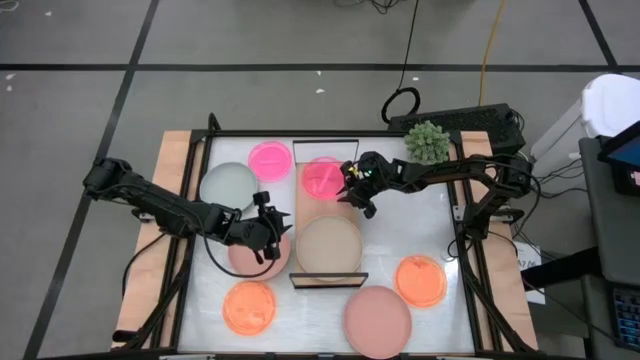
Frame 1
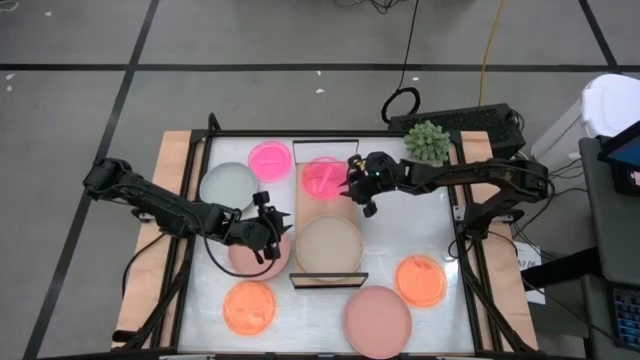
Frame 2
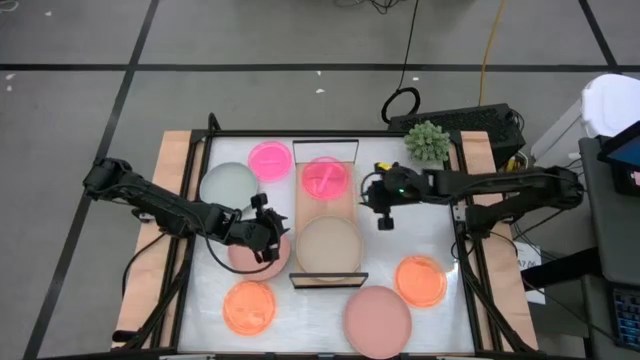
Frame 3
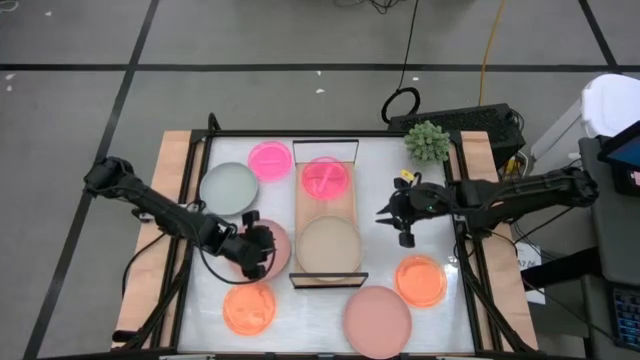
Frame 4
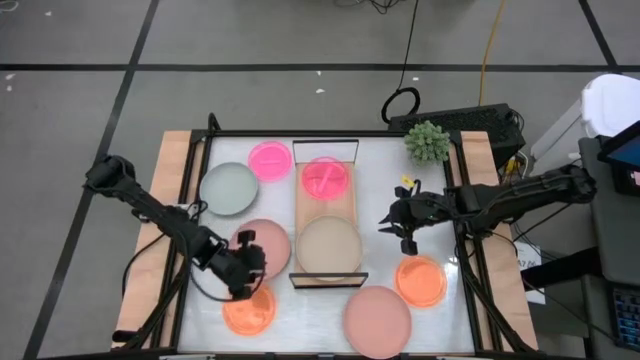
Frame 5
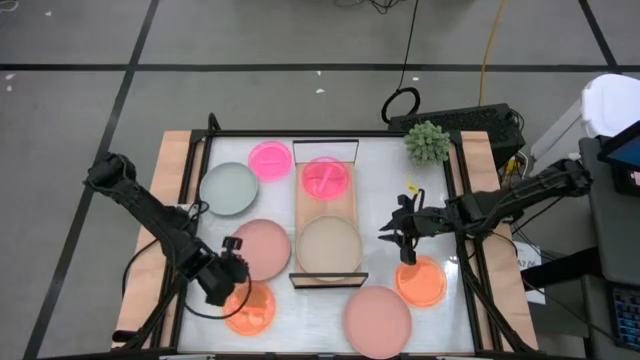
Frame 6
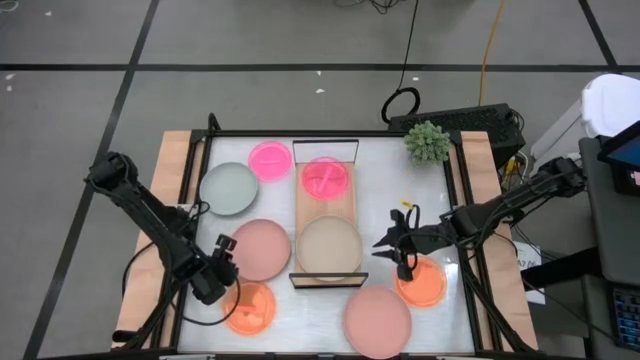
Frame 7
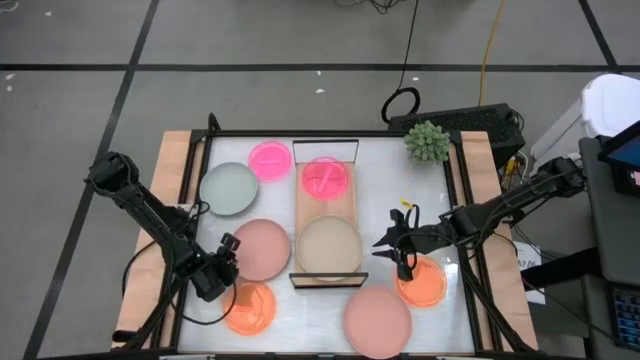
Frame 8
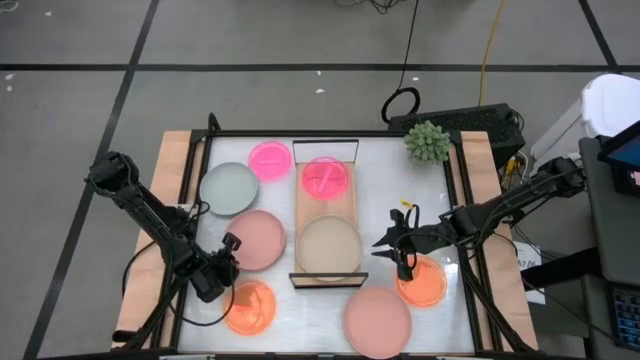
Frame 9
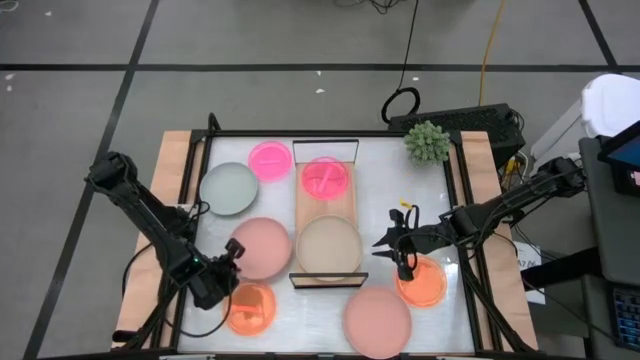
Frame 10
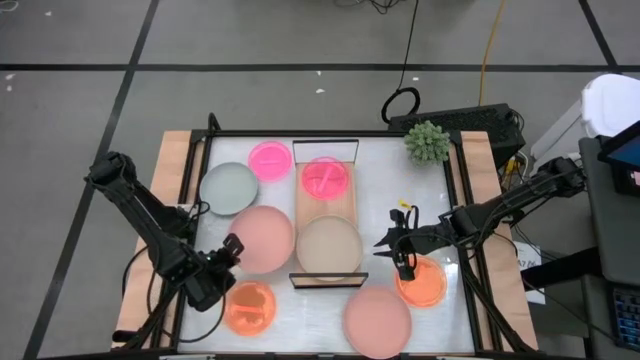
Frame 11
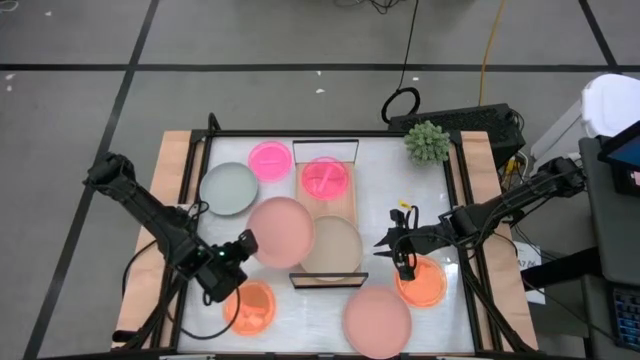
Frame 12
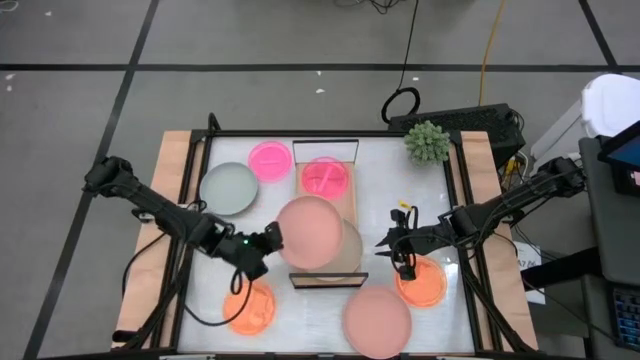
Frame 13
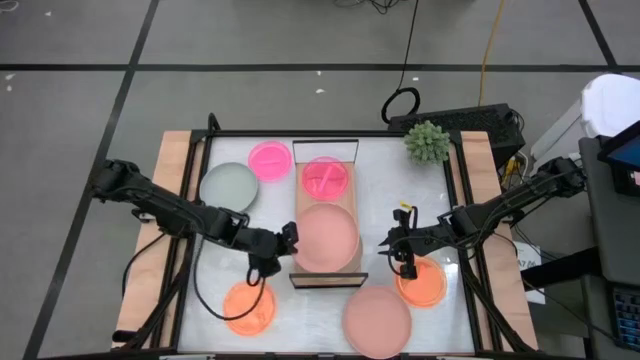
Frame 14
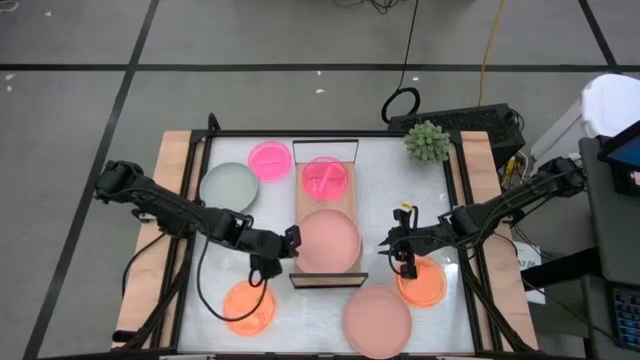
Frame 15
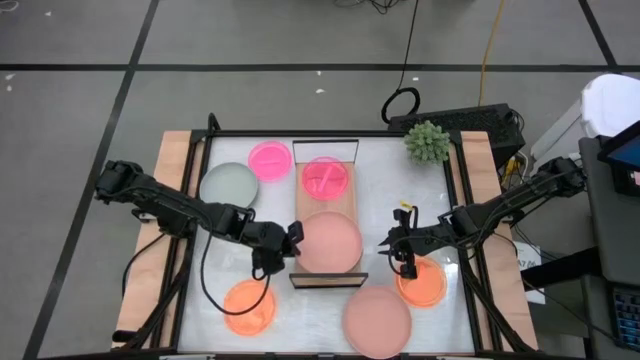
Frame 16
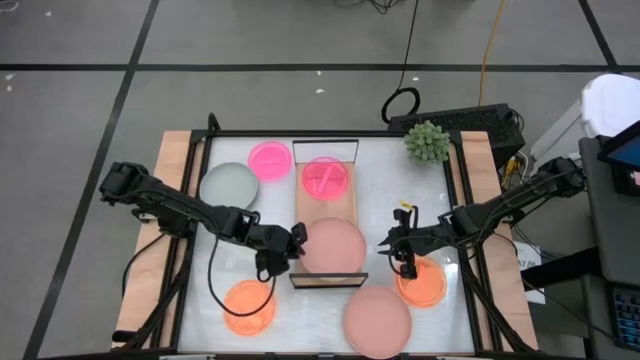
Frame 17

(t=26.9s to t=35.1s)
Task: Place and stack plates onto a shelf
Stack the left pink plate on top of the brown plate on the shelf

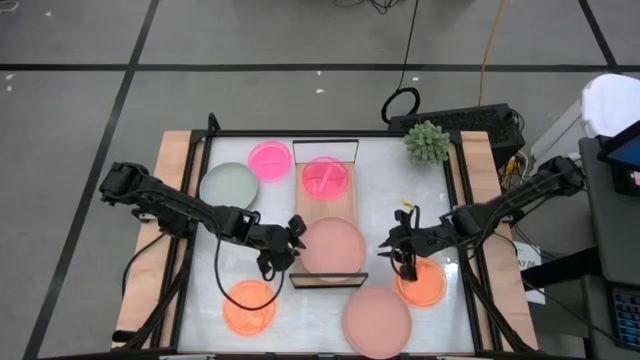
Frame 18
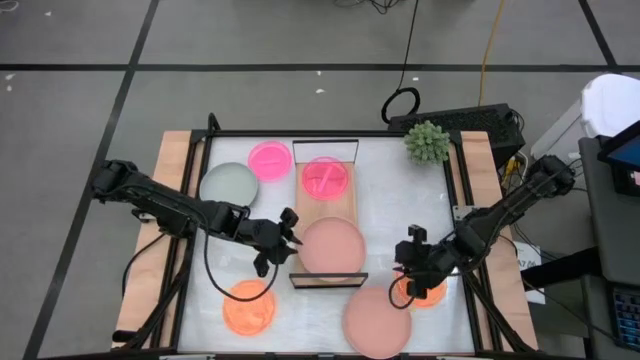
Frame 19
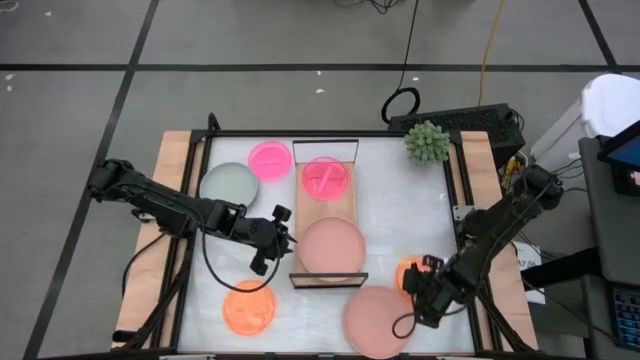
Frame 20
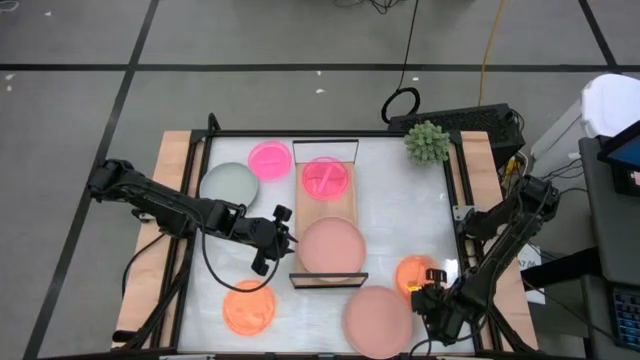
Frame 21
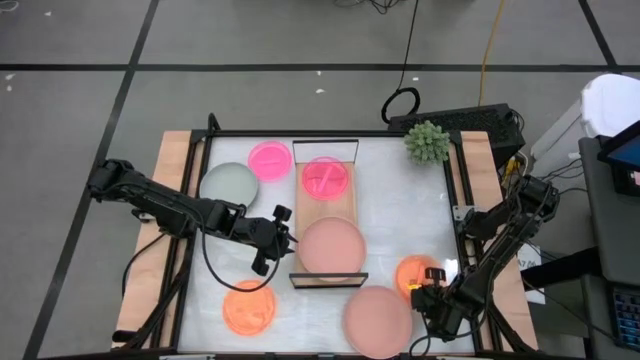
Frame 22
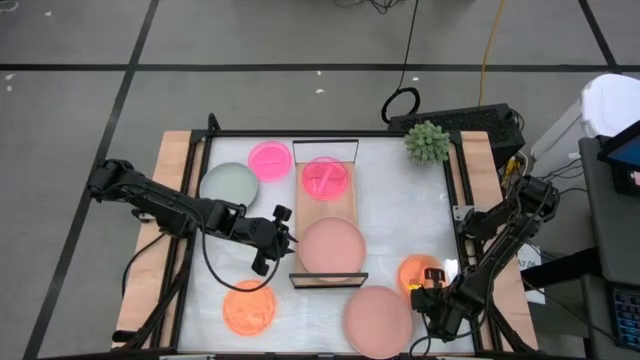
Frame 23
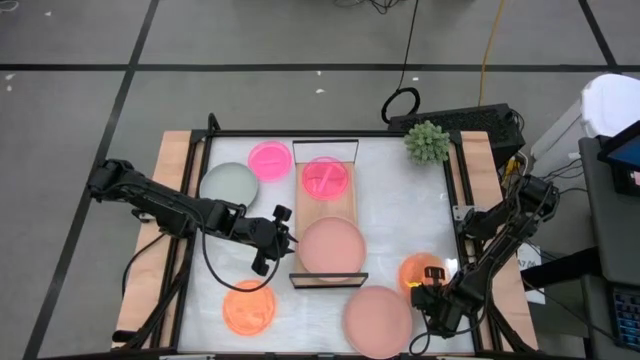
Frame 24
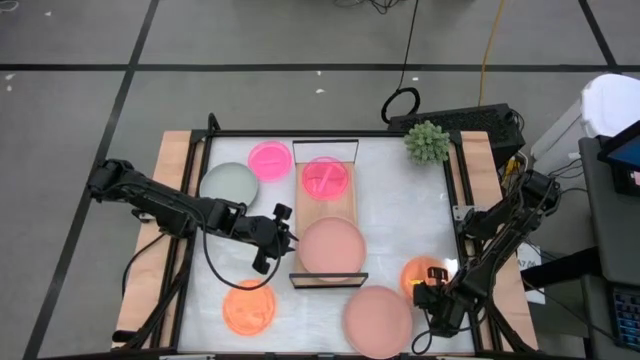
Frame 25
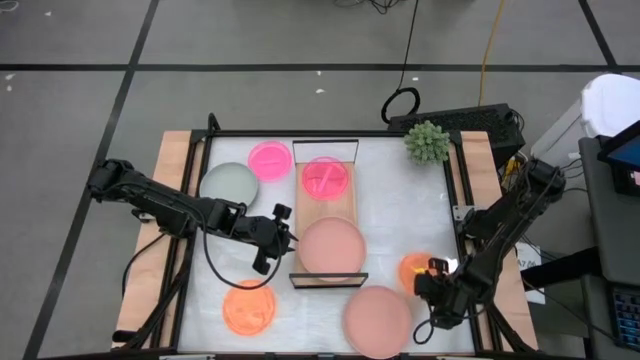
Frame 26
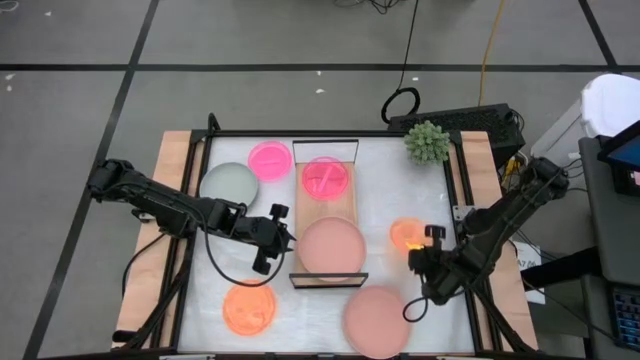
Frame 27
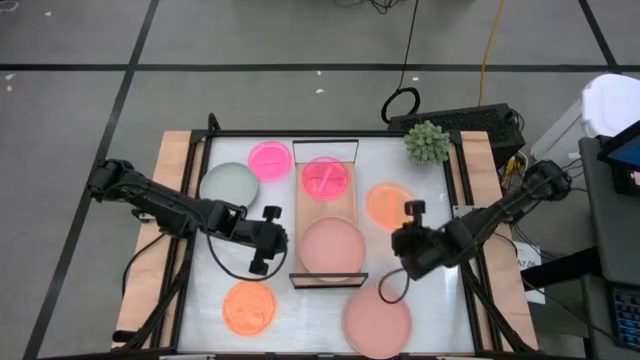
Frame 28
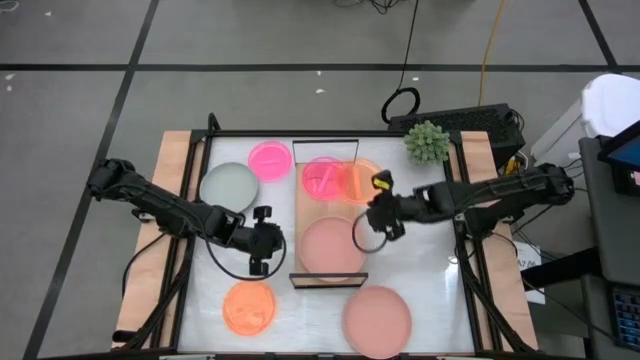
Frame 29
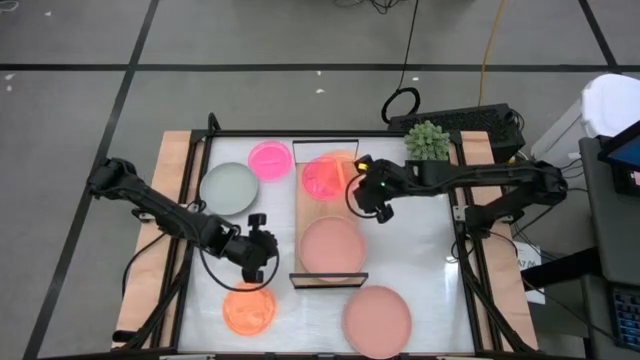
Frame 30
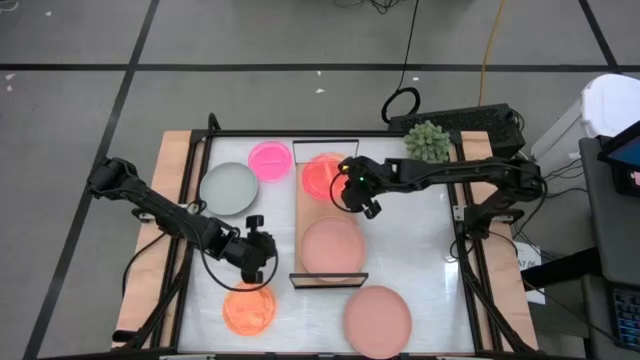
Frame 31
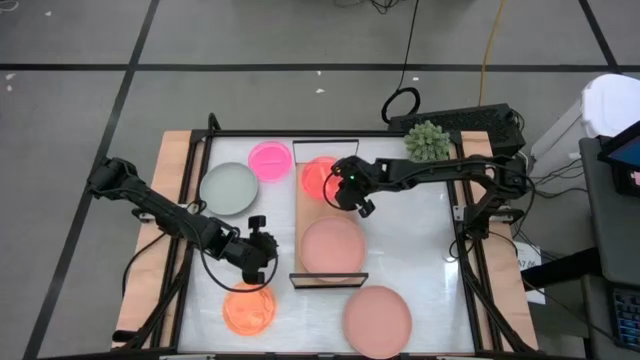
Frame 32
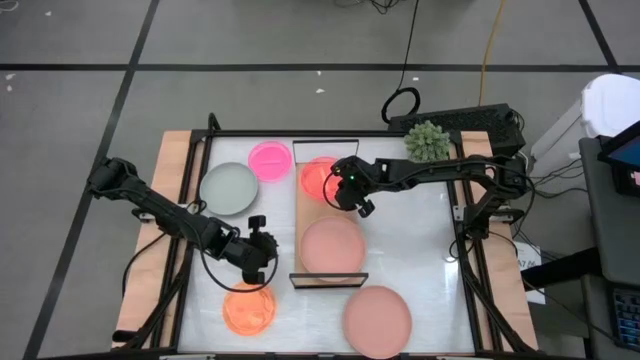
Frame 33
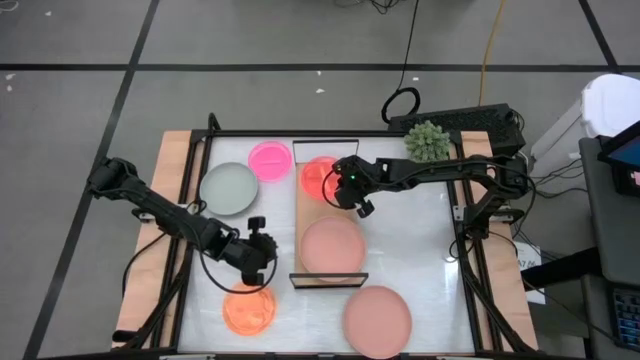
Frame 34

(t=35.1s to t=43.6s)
Stack the right orange plate on top of the pink plate on the shelf

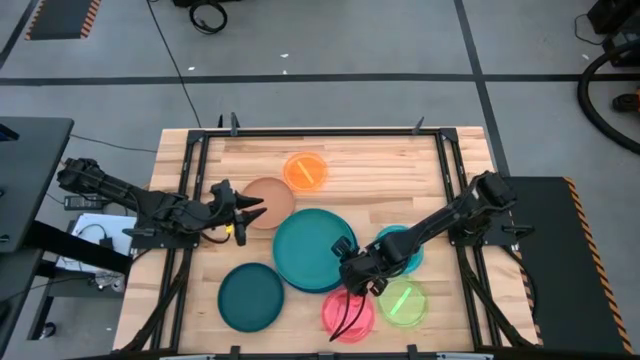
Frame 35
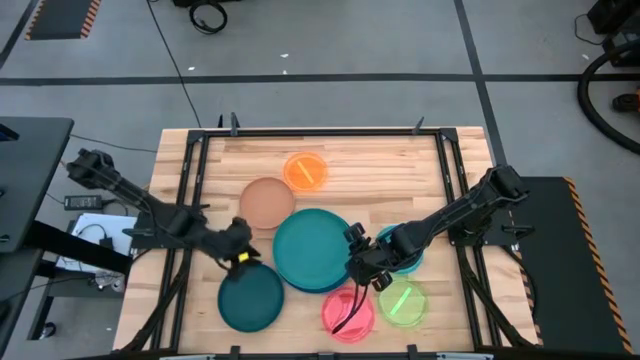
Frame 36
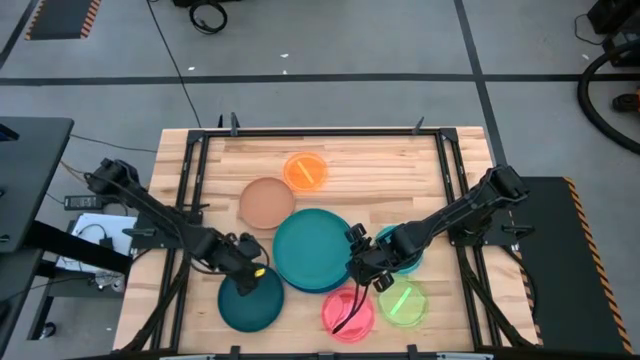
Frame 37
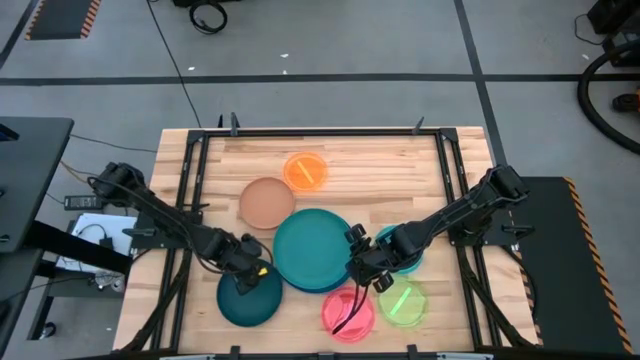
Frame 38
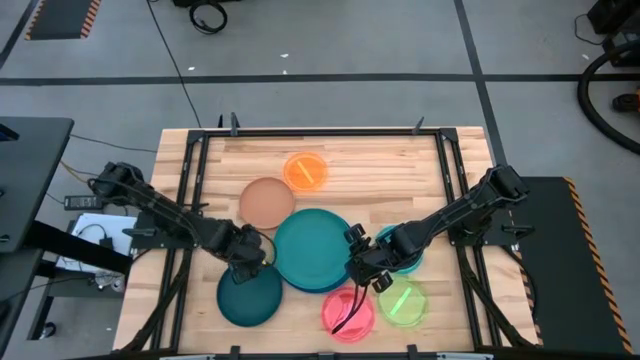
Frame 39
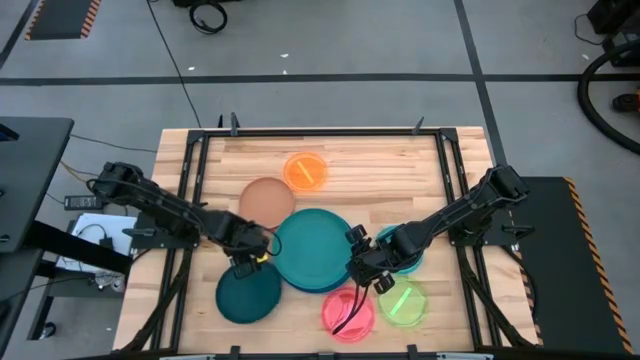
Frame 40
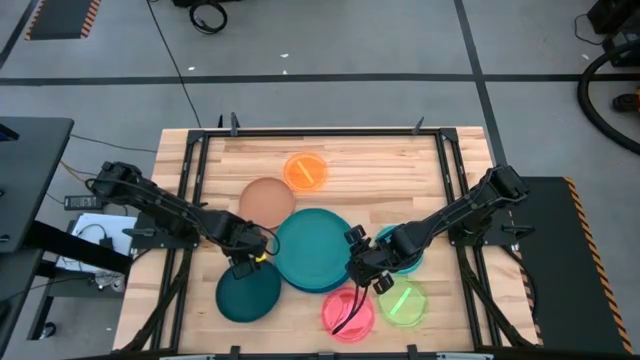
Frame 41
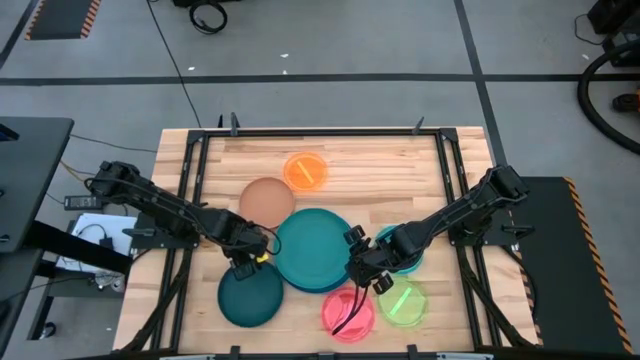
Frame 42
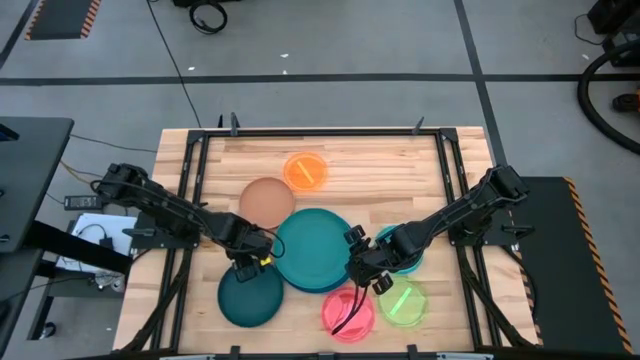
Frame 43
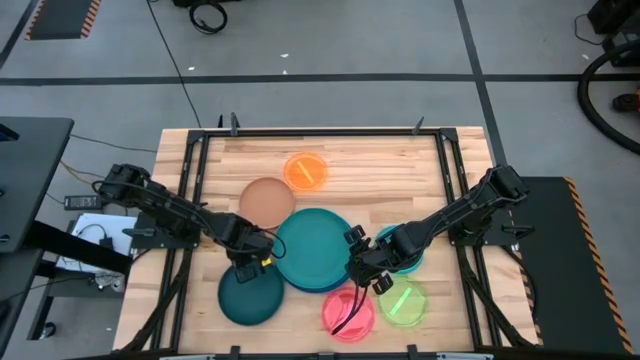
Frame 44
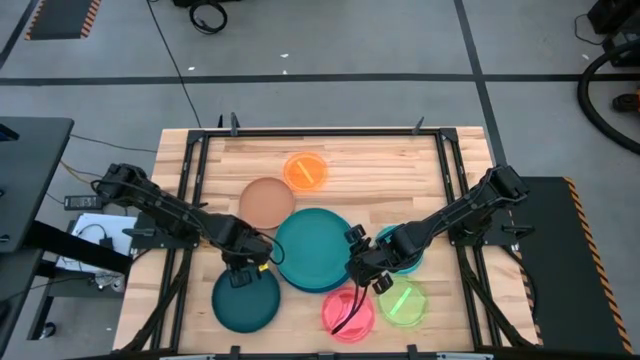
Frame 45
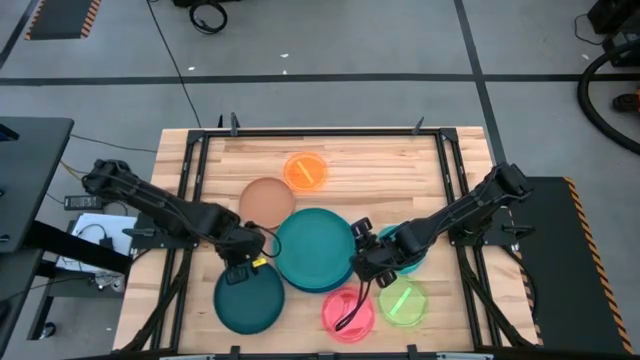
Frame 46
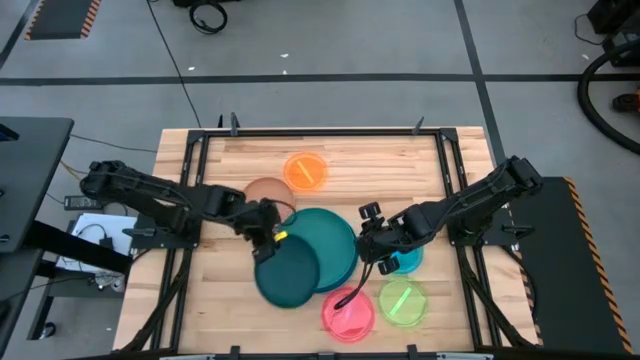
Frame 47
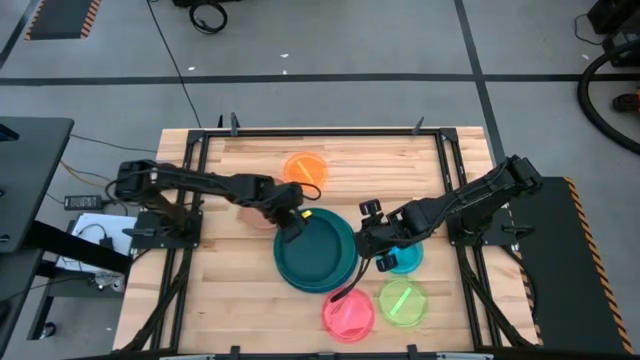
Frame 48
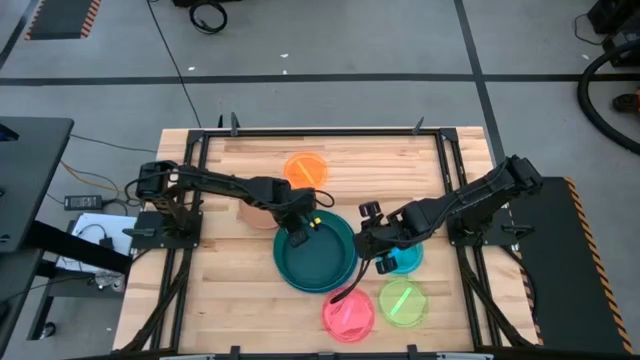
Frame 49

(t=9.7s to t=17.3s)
Task: Stack plastic plates
Stack the dark green plate on top of the green plate
